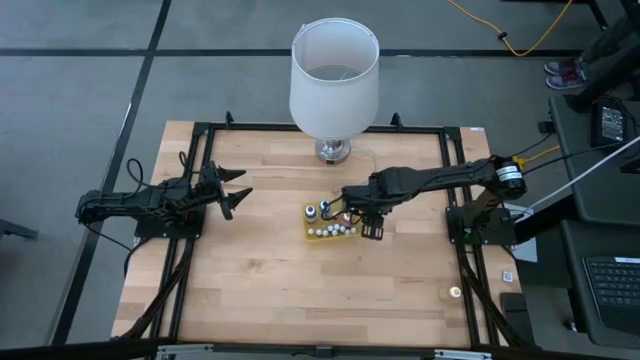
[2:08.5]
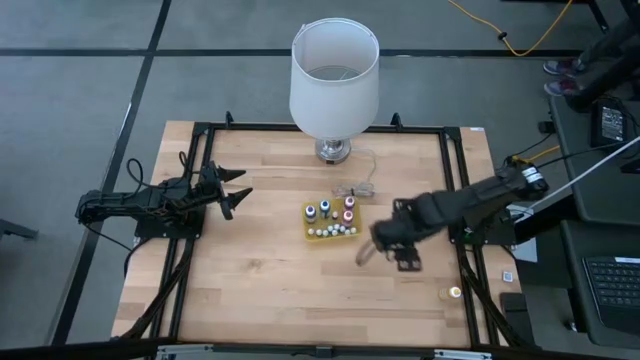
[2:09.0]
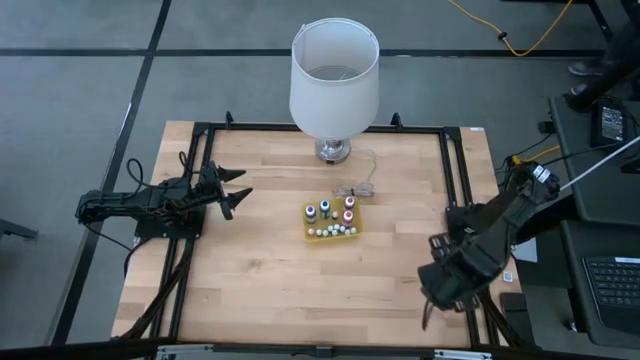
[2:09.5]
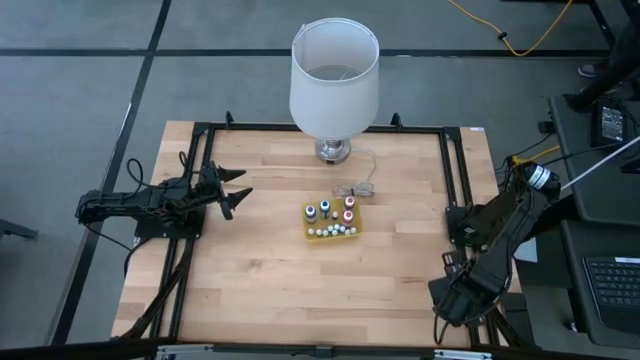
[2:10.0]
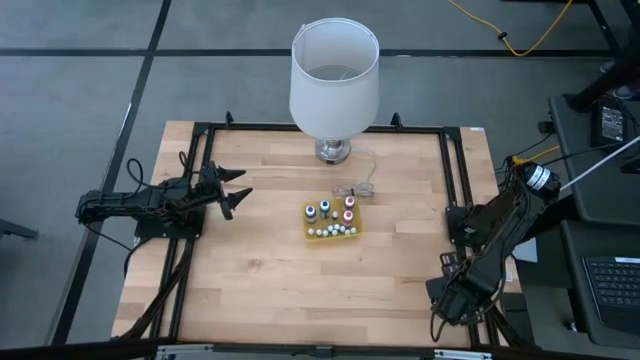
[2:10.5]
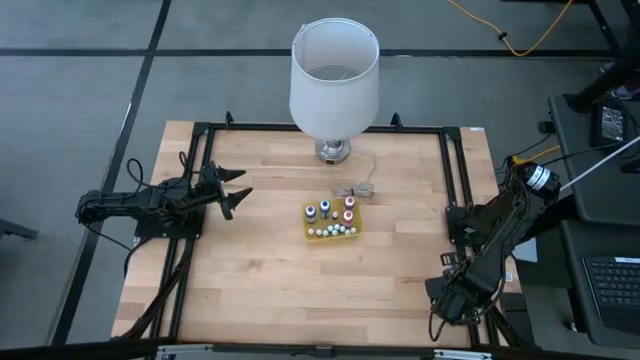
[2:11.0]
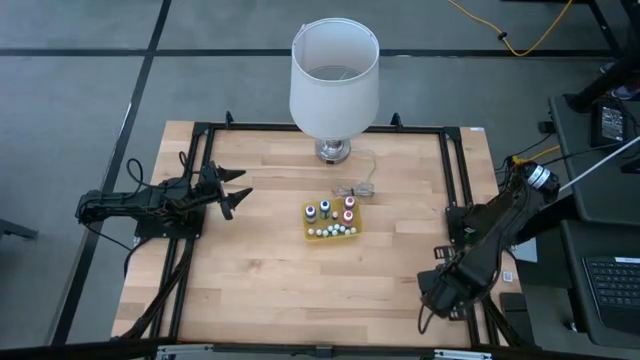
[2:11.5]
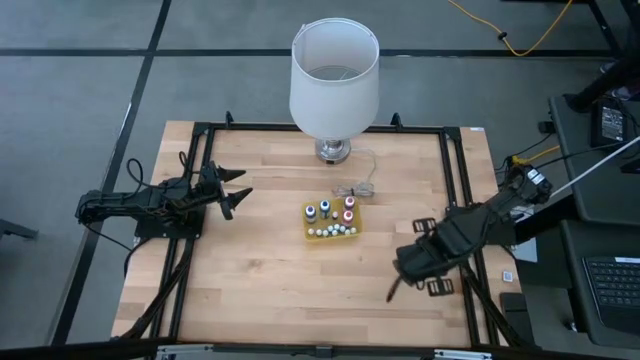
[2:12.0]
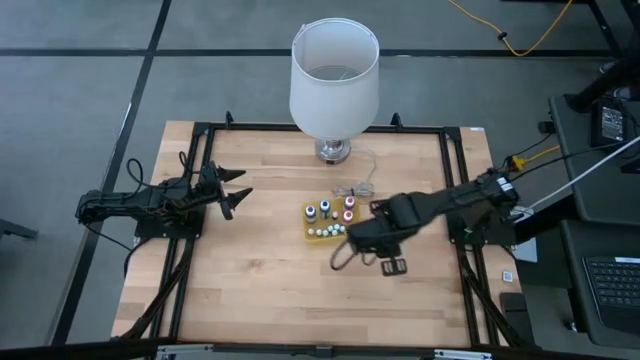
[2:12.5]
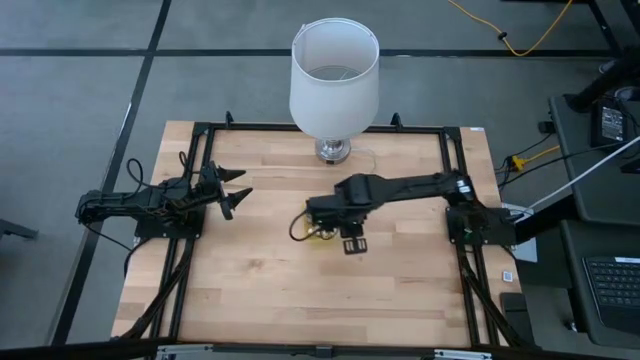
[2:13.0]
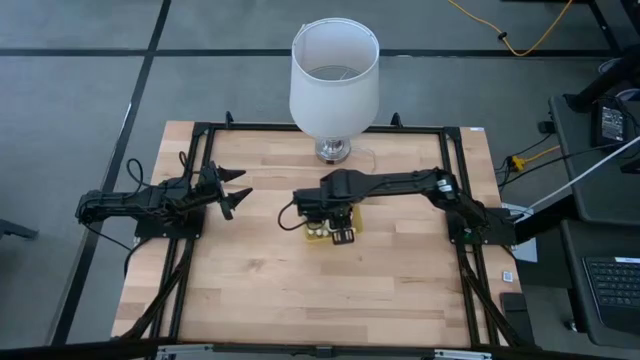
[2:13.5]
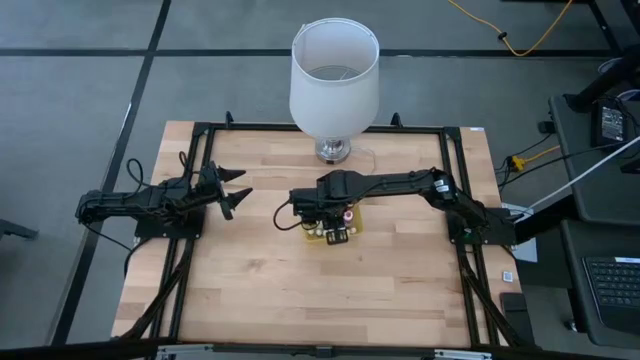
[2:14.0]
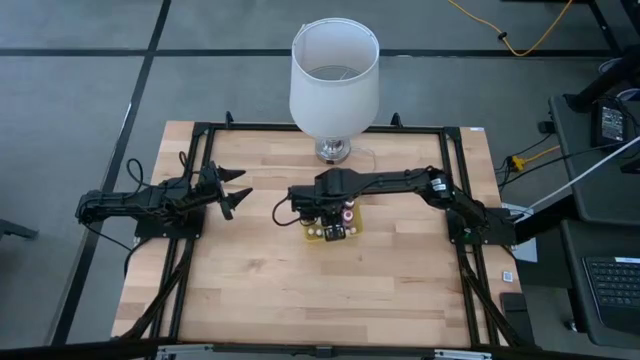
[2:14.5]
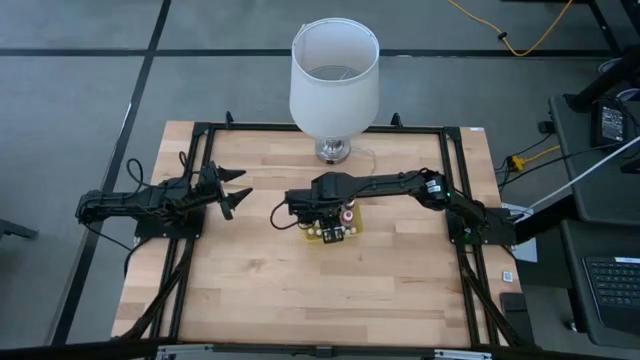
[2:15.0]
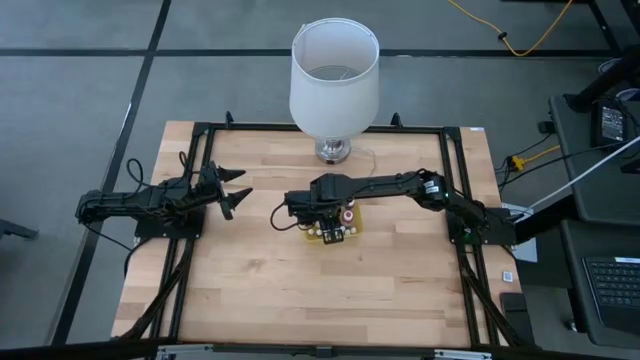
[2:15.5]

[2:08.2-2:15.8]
Task: Pick & Place food coloring
Put the large yellow food coloring bottle into the yellow bin

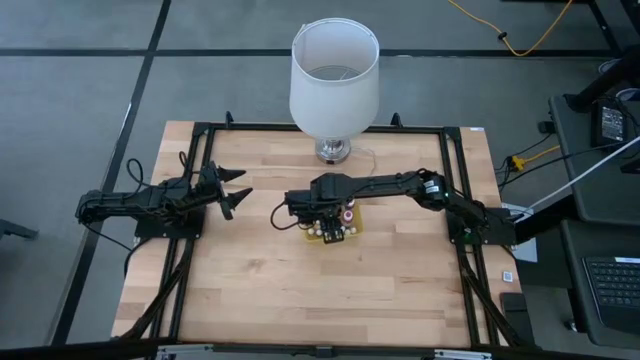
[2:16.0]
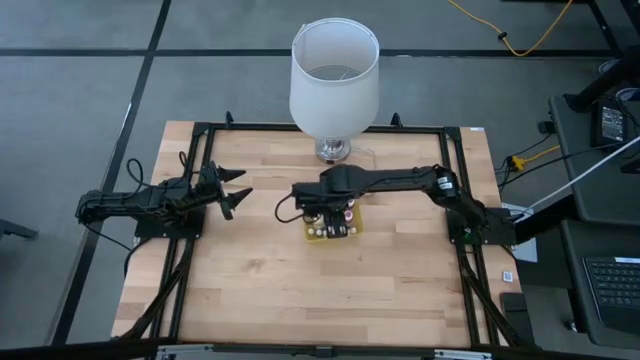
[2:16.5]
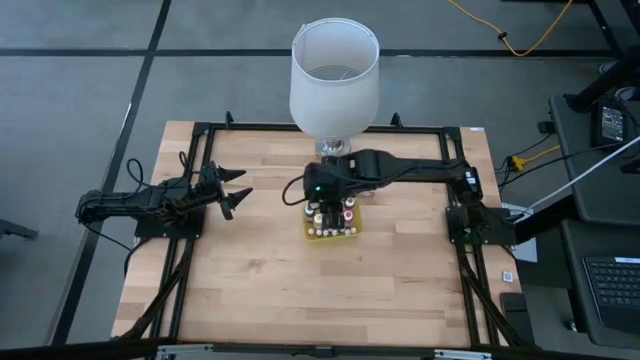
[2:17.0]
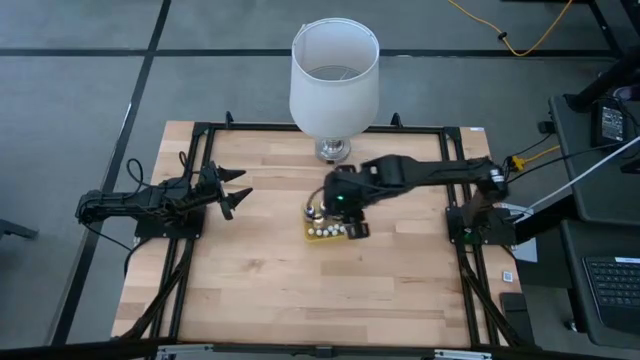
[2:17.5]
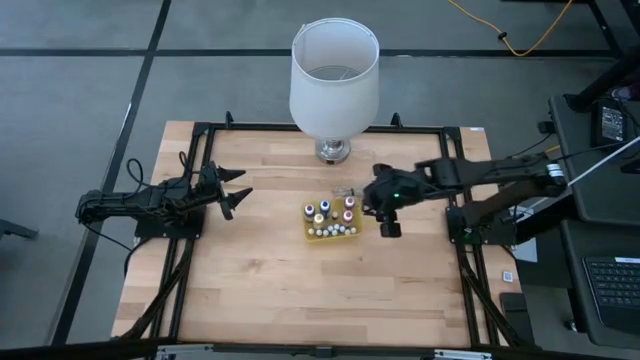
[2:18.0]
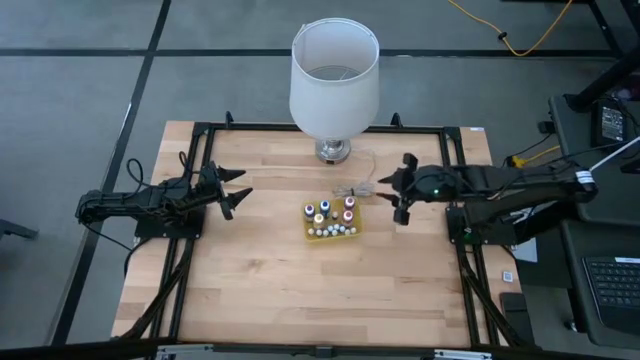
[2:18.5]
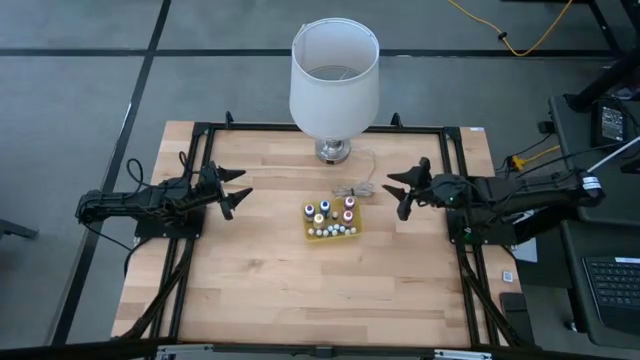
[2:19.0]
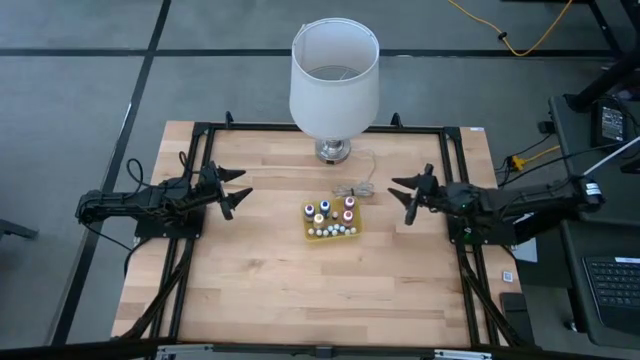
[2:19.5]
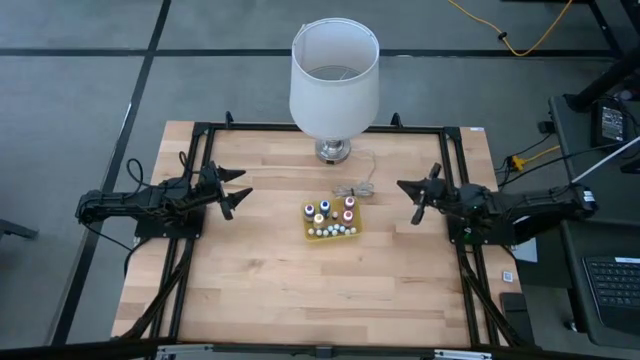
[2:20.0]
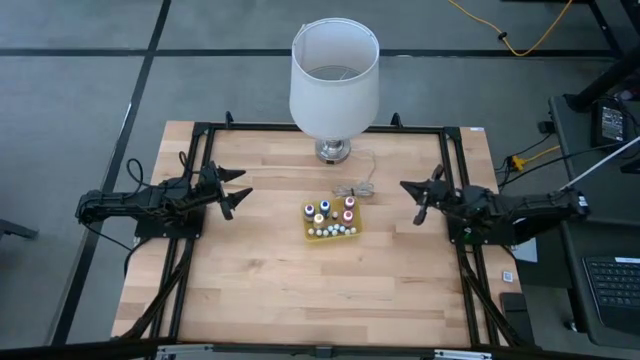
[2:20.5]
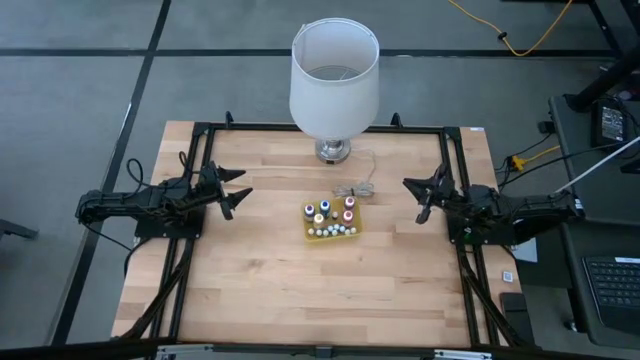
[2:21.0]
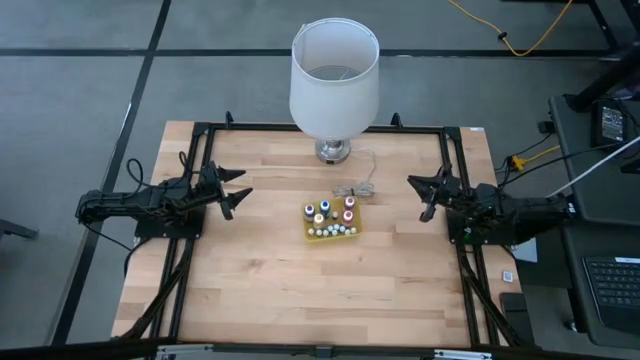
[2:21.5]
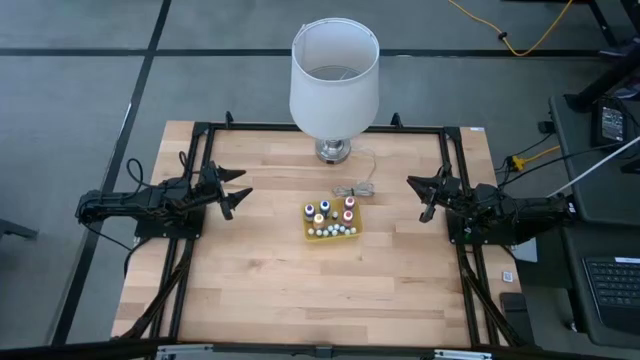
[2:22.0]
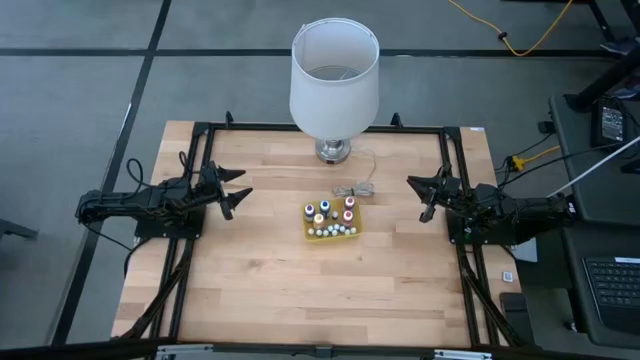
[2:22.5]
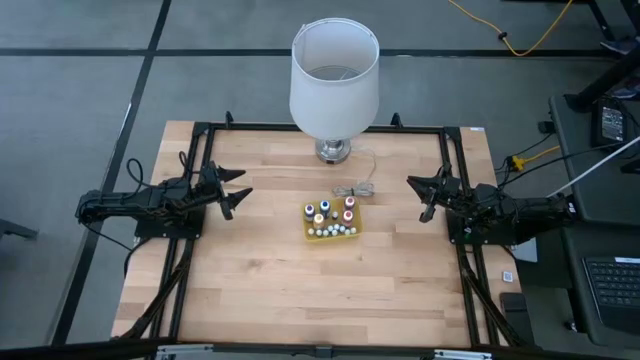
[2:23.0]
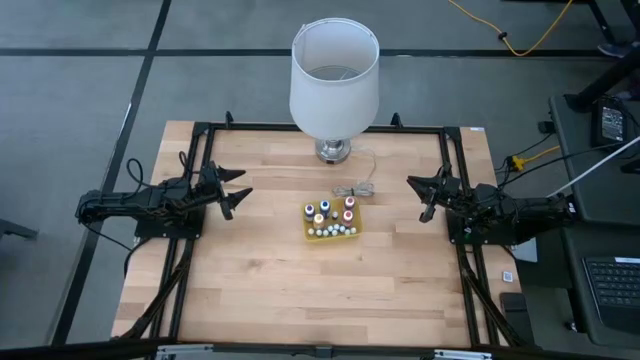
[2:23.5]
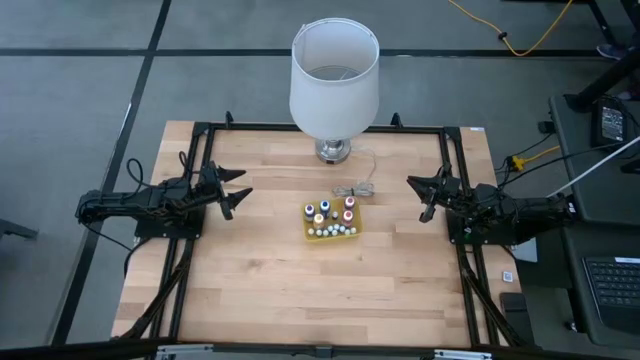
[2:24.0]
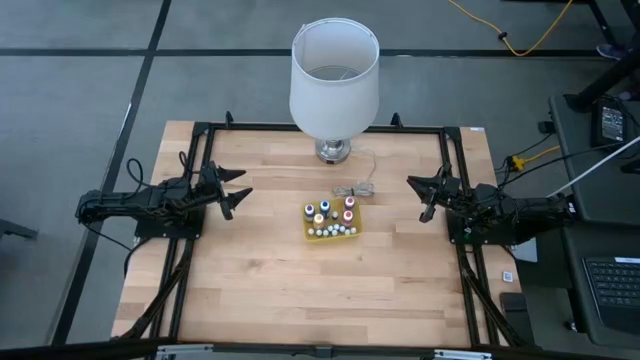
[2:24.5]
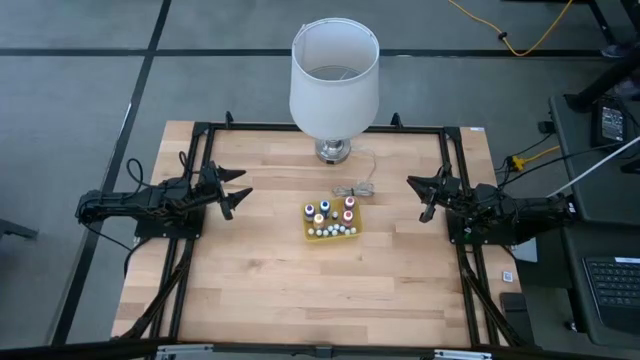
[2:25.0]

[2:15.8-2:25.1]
Return to Home Position

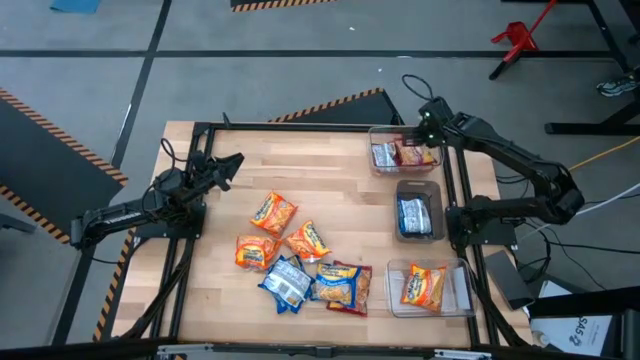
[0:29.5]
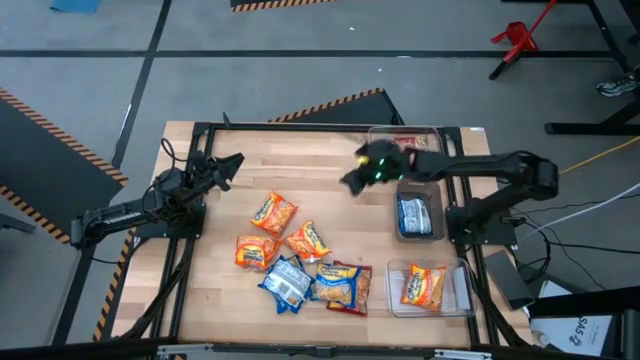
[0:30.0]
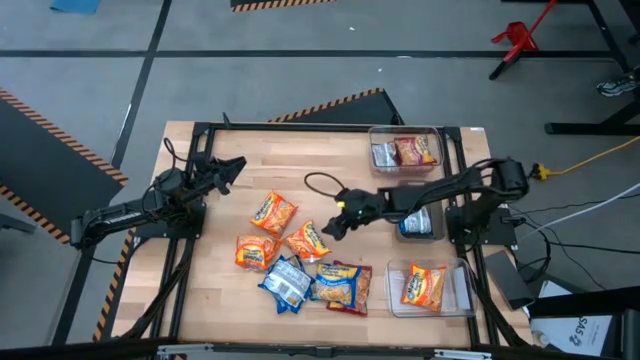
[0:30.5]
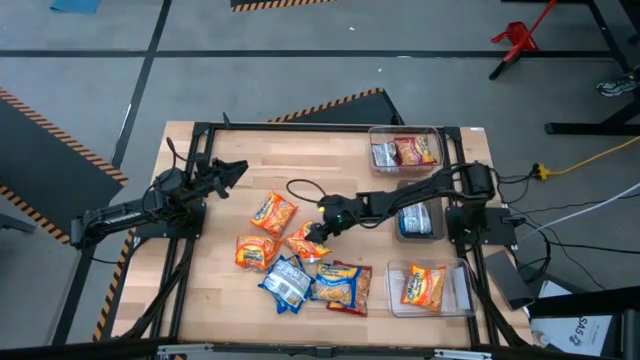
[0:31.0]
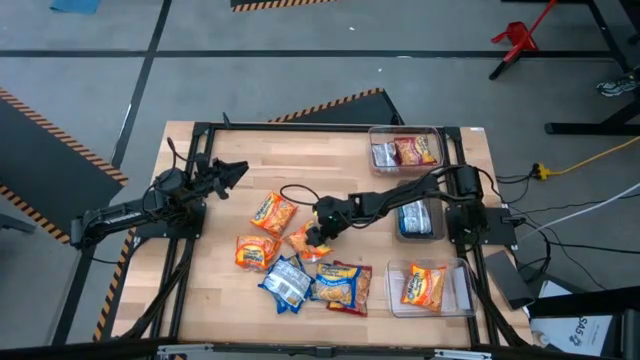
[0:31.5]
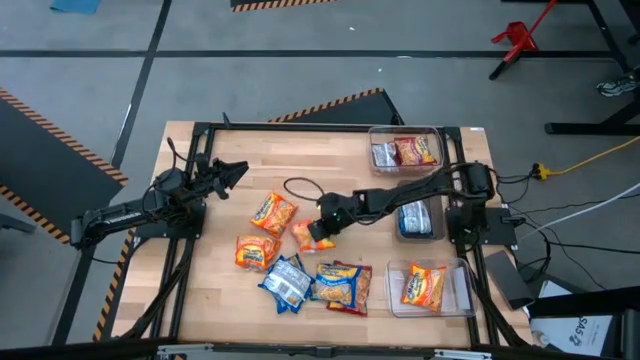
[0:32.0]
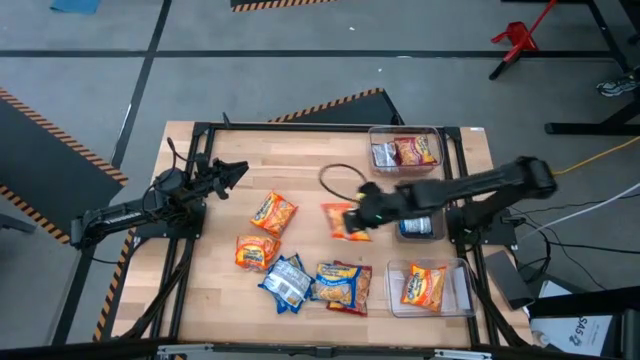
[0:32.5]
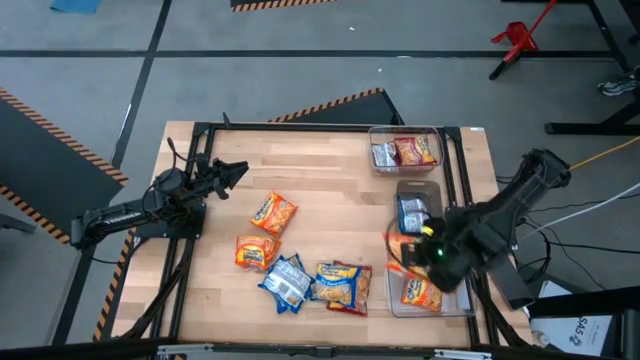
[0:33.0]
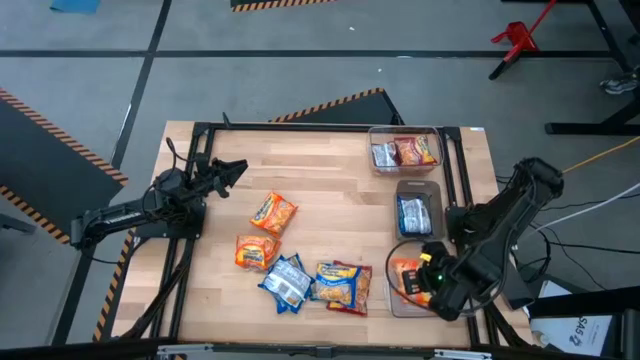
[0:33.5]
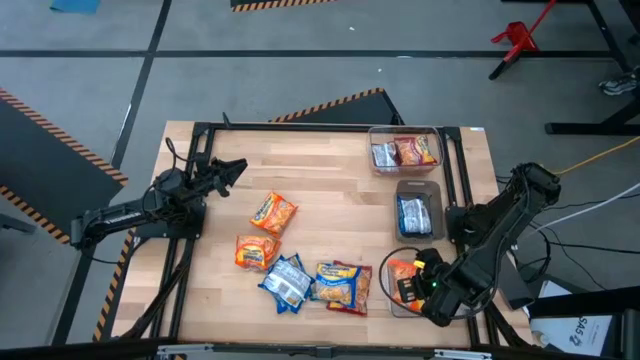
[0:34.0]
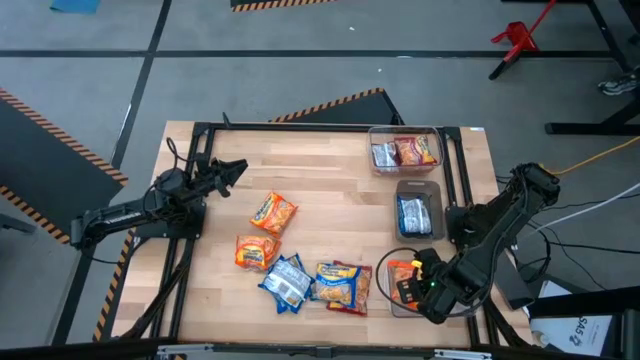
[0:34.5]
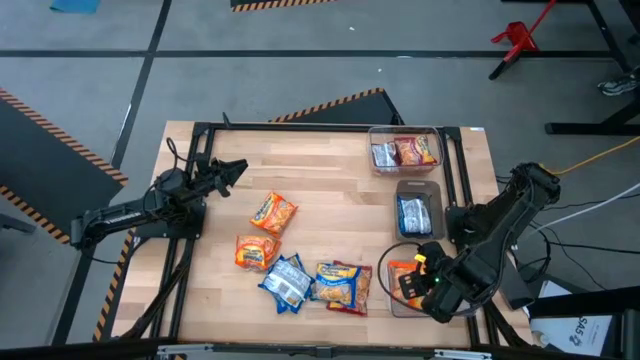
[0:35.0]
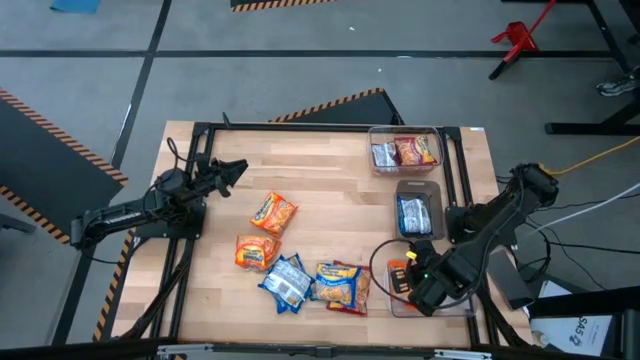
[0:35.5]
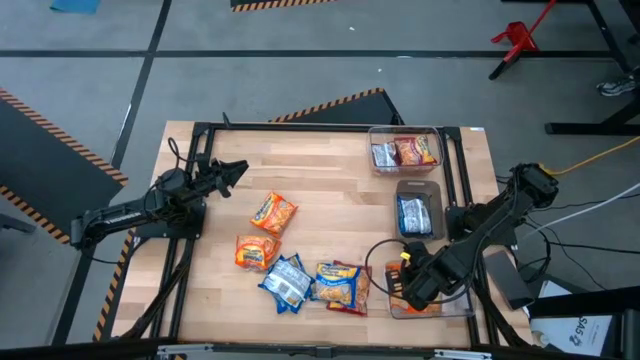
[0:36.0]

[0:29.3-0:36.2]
Task: Sort Maruchan noodles
Put the orange noodle pack into the bottom transparent bin
